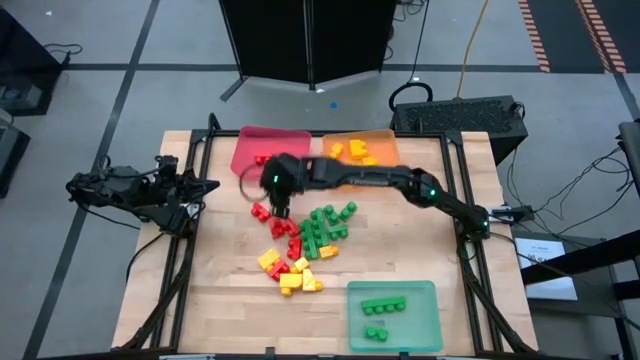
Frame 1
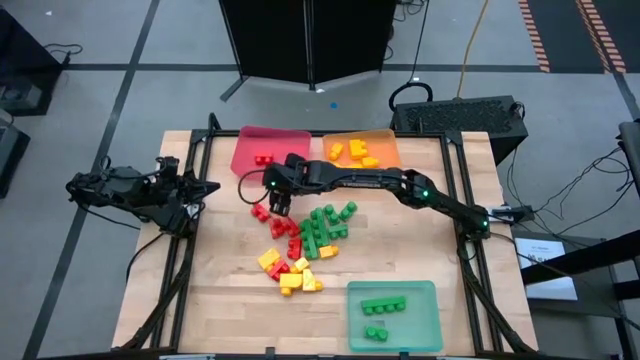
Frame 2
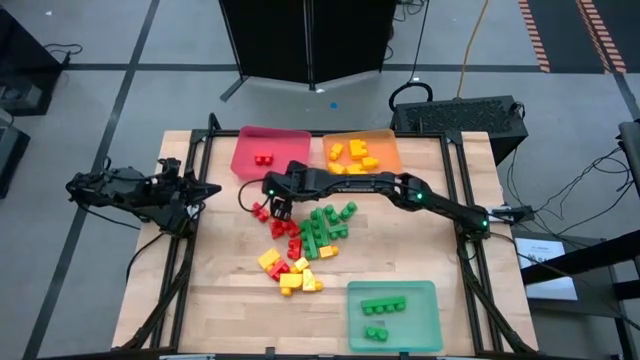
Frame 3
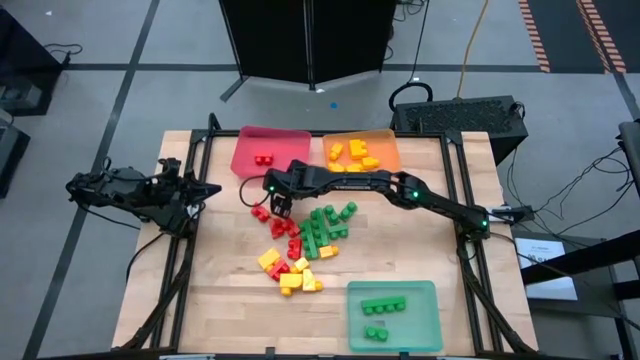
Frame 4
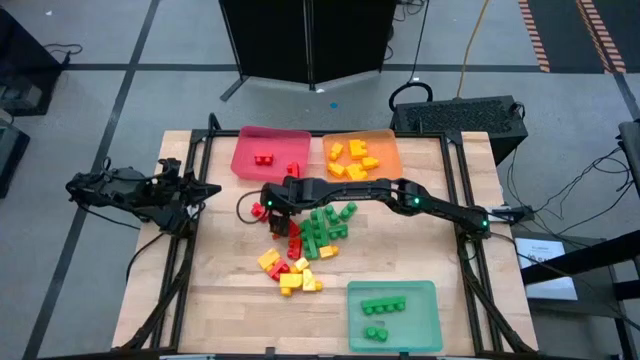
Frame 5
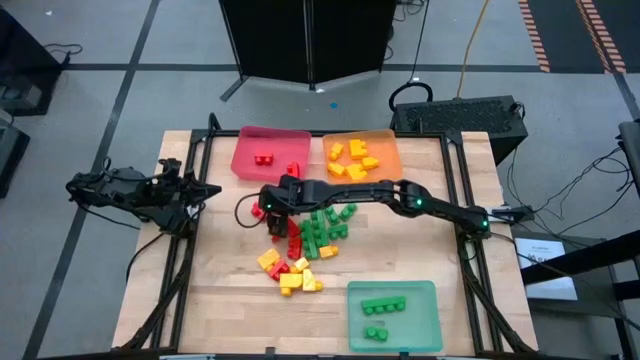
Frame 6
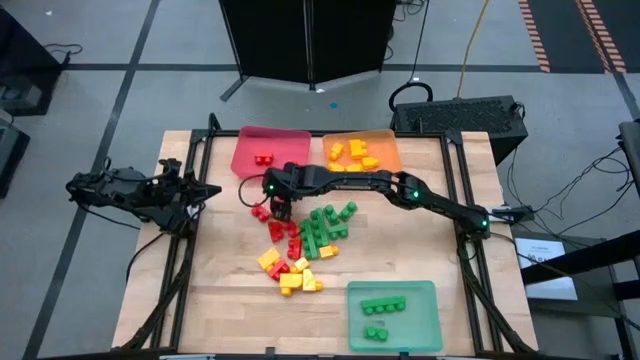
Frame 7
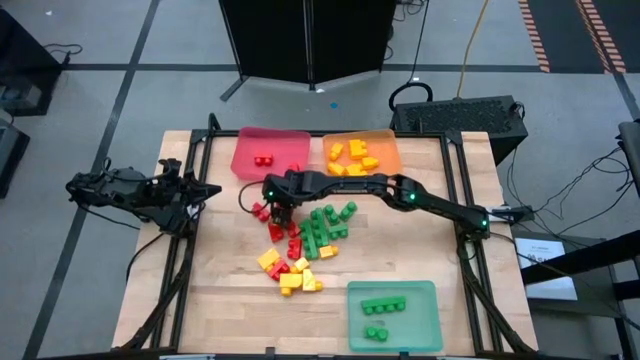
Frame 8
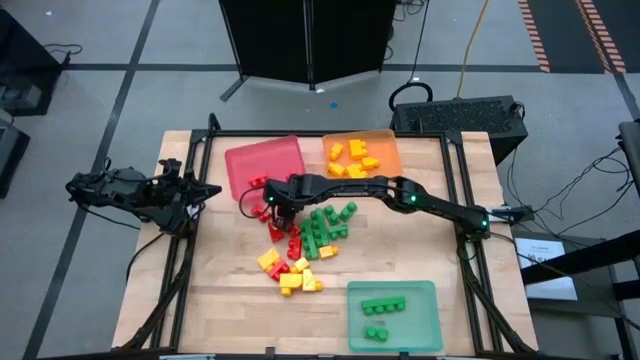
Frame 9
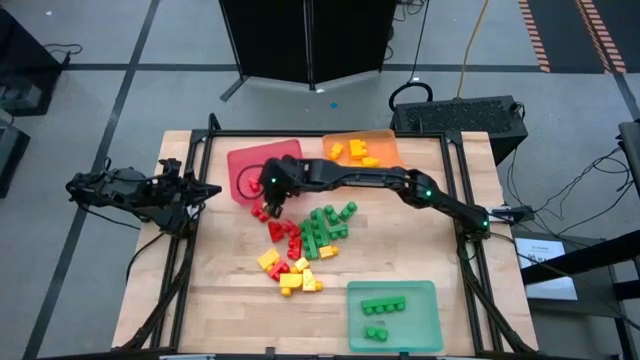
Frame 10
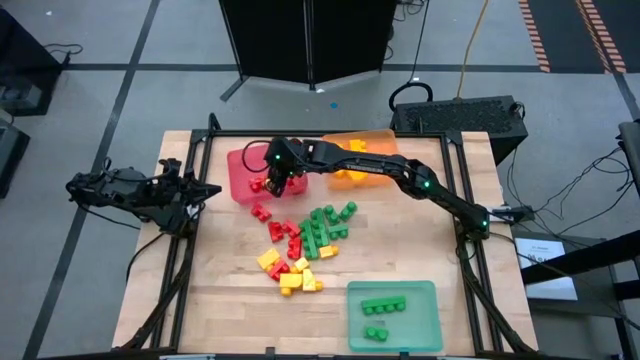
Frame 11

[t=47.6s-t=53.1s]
Task: Sort blocks
Put the red game piece into the red bin

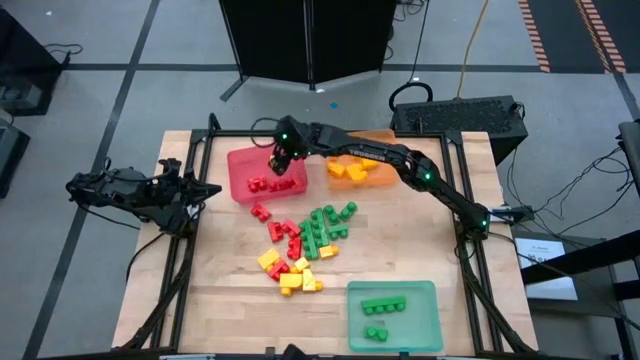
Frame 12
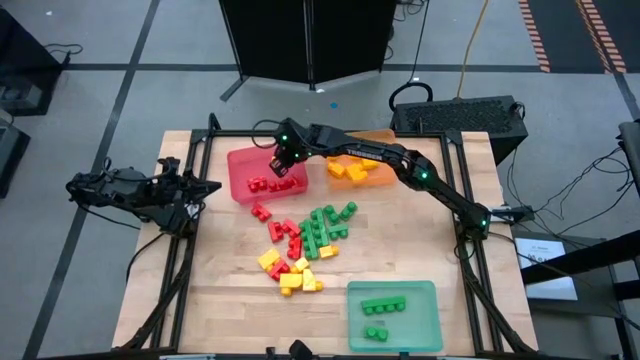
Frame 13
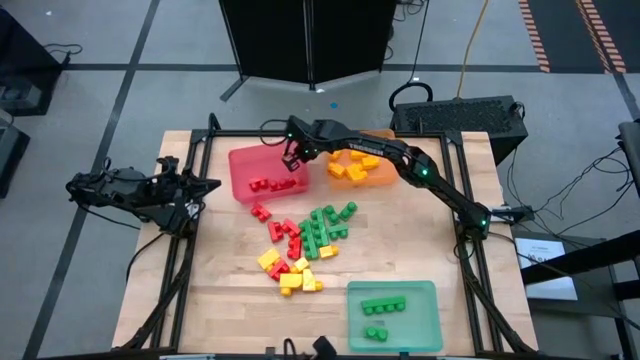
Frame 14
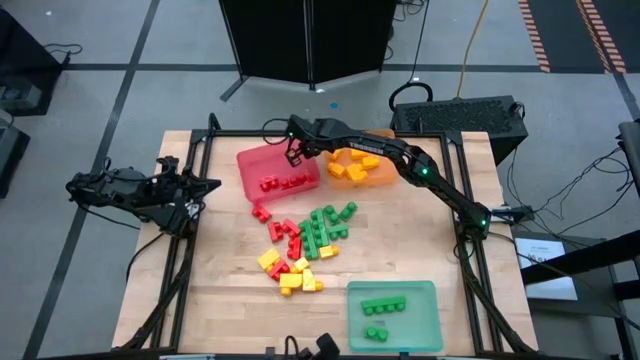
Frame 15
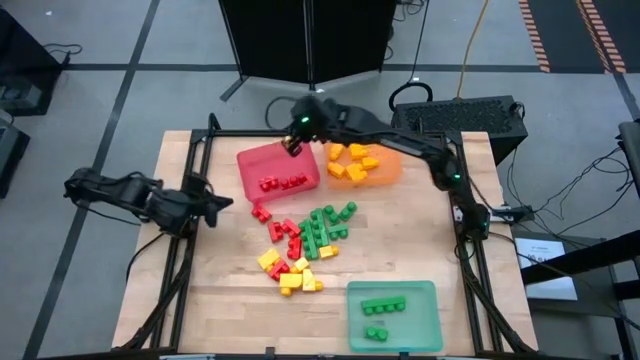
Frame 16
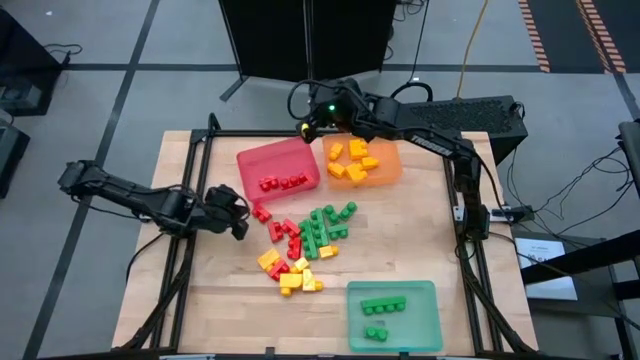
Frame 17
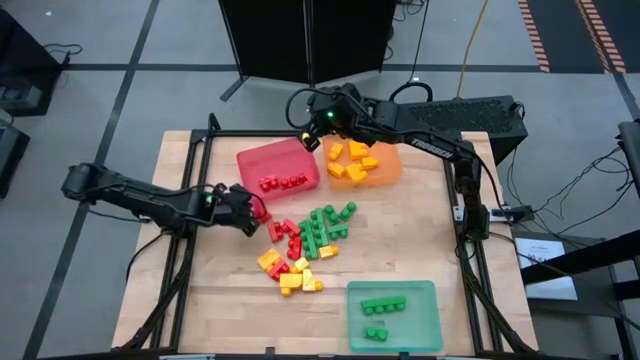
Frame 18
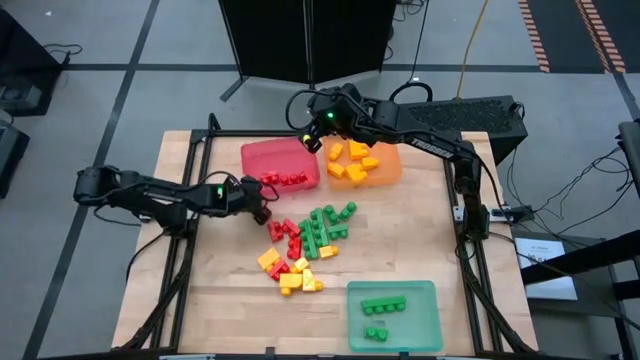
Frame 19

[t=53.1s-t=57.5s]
Adjust the red bin

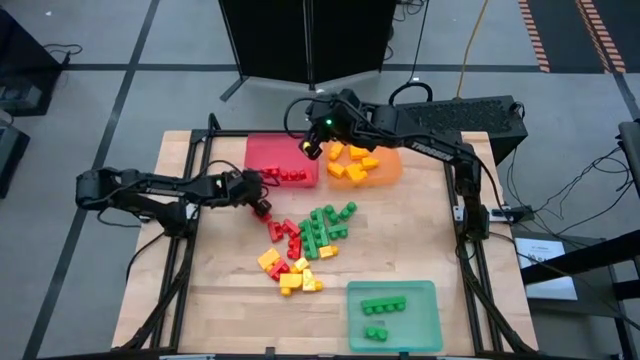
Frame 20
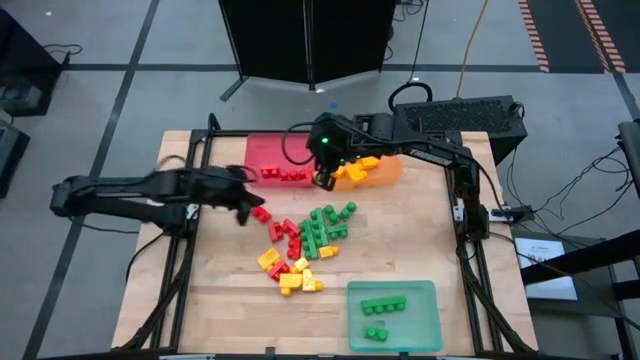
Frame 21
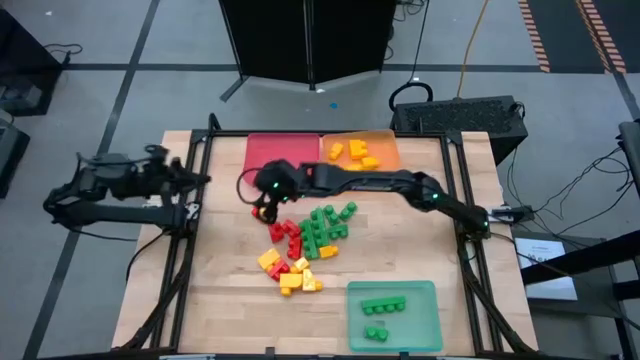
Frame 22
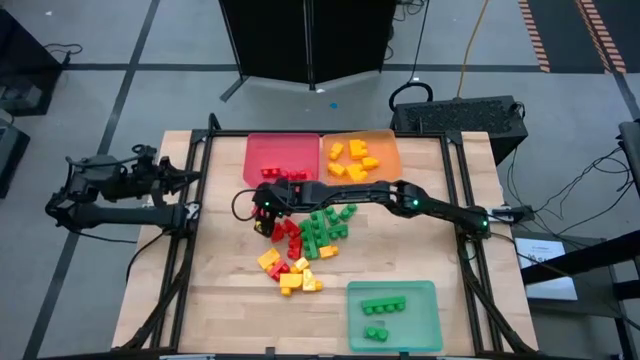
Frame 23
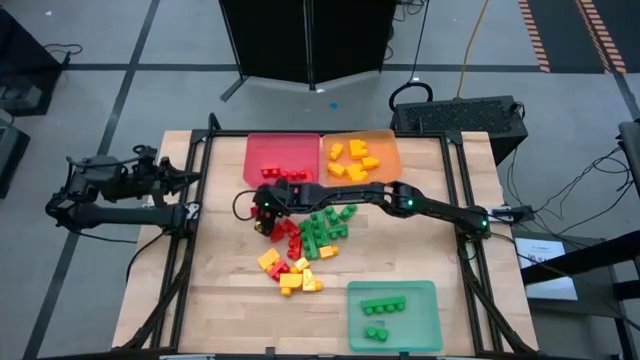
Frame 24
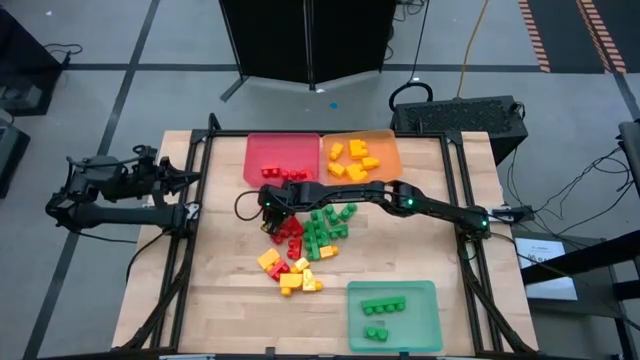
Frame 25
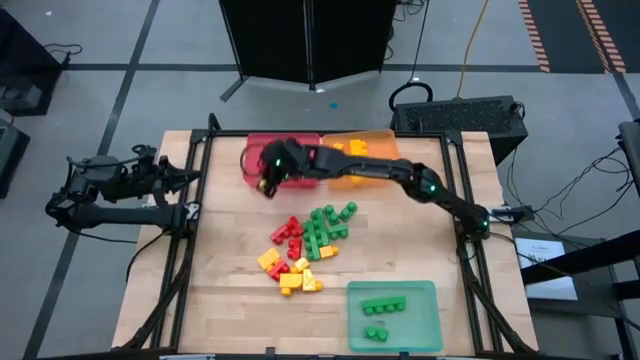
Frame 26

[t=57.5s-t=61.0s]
Put the red game piece into the red bin

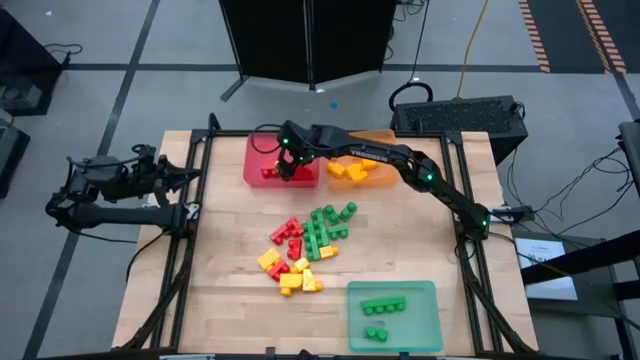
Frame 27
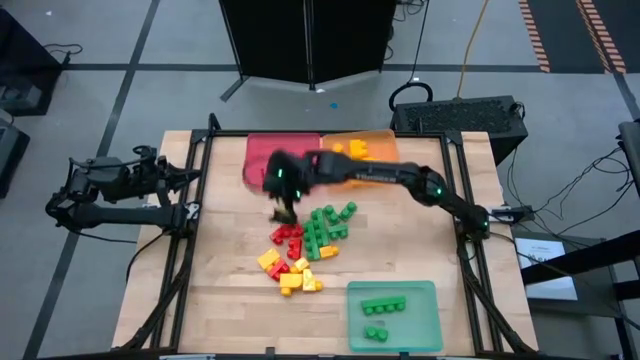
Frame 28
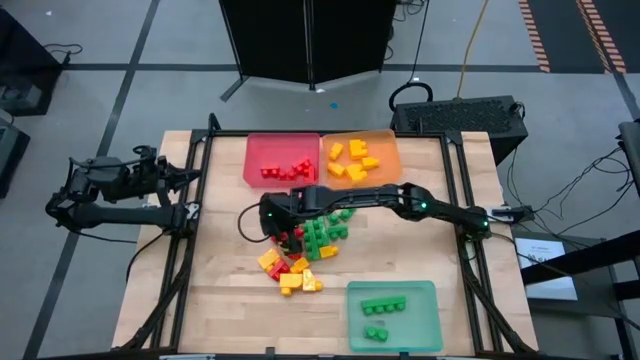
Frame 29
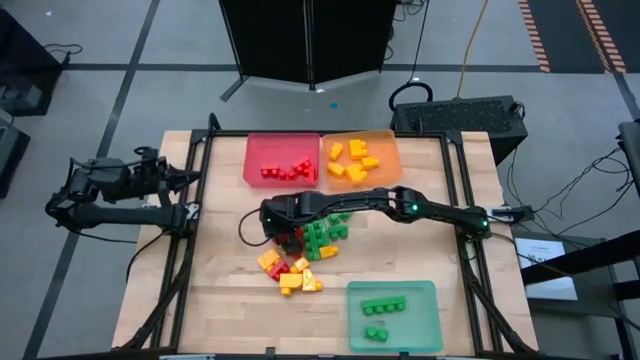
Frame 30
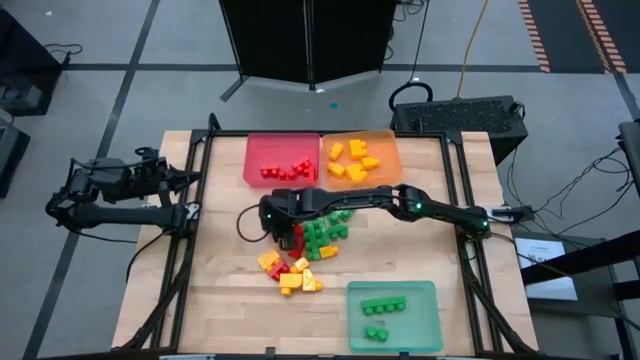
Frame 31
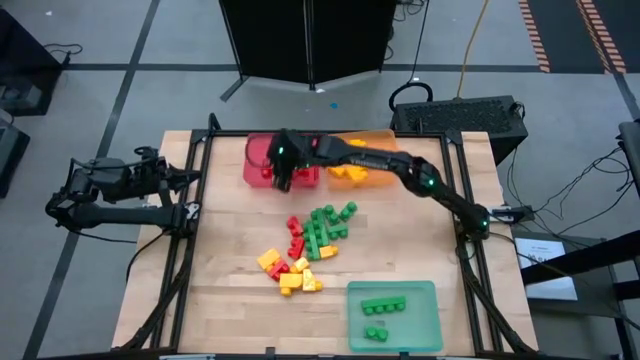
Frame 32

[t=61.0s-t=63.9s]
Put the red game piece into the red bin

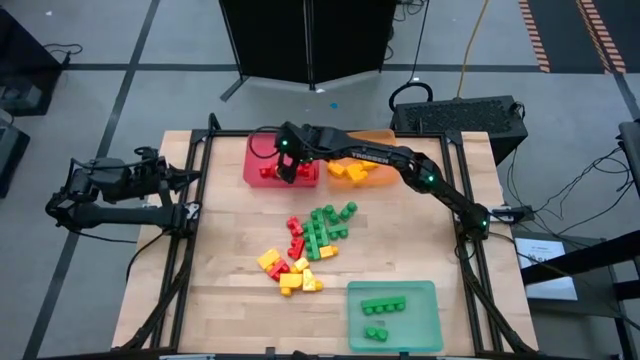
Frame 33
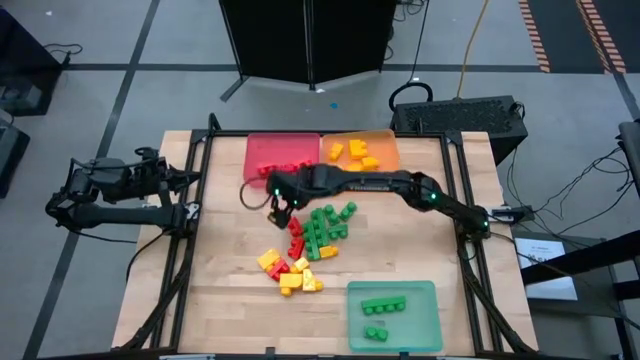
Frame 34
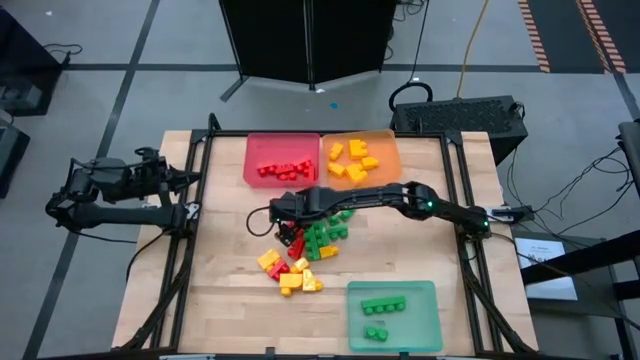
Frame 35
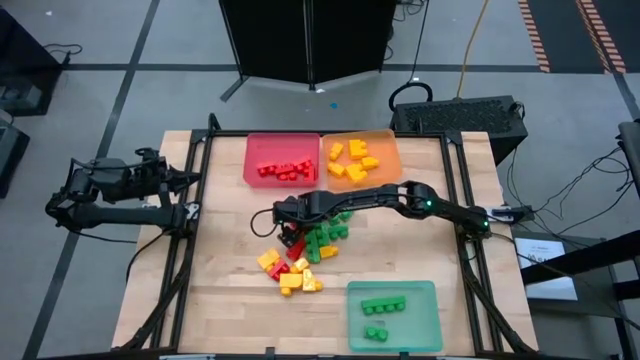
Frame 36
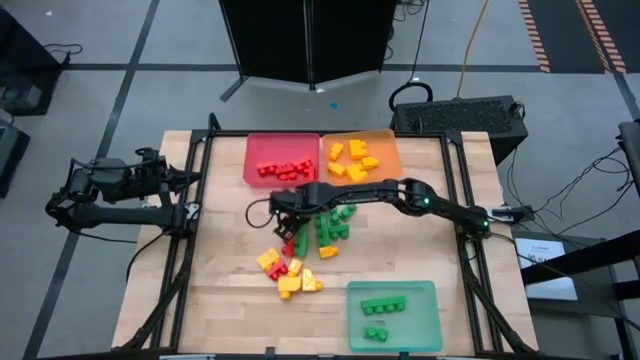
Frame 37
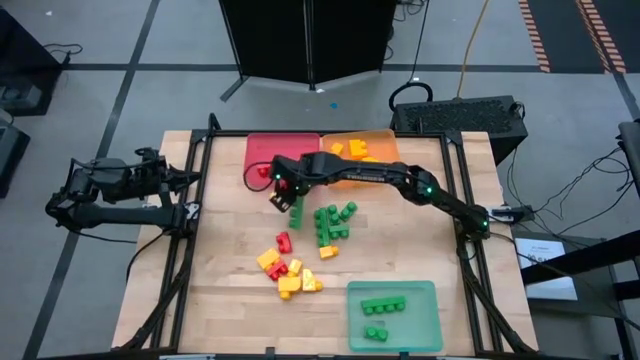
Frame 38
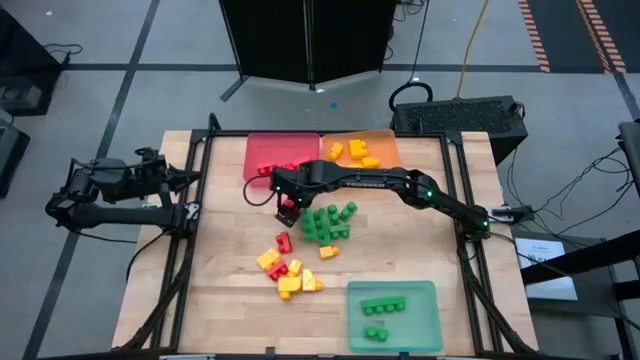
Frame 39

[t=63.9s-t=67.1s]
Put the green game piece into the green bin

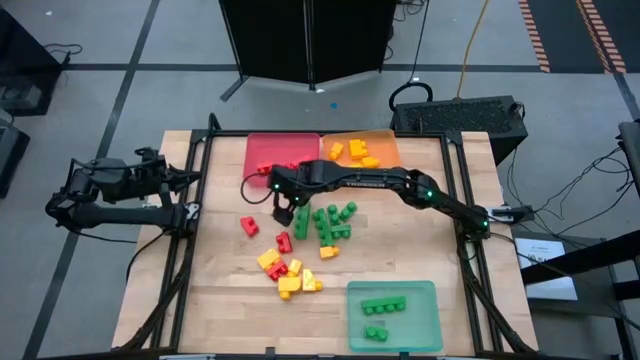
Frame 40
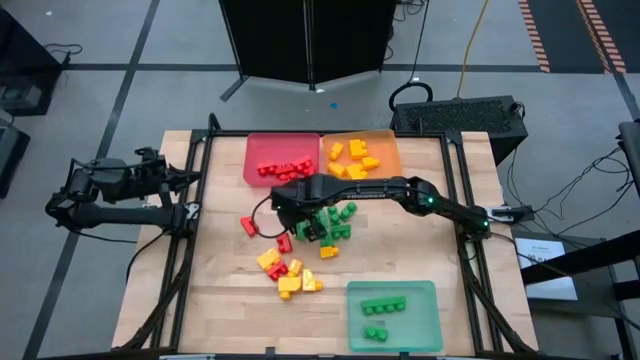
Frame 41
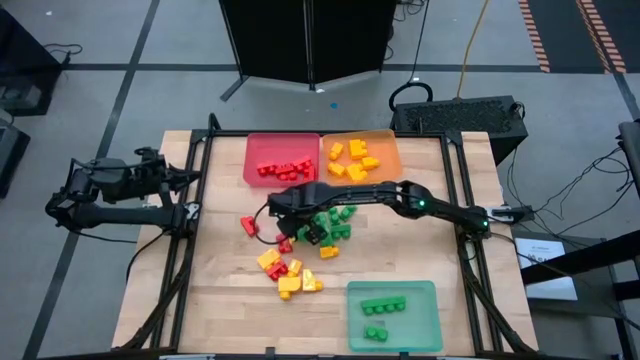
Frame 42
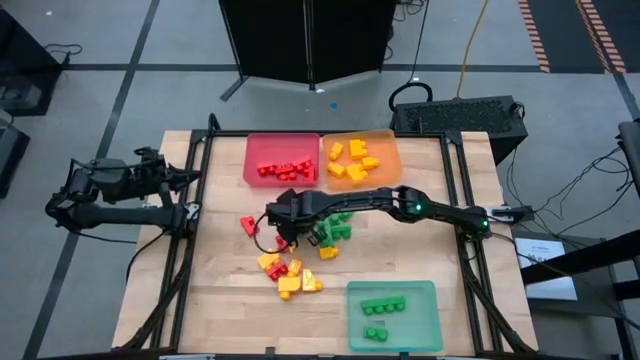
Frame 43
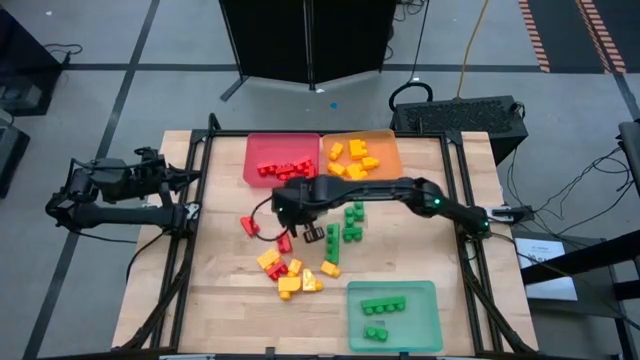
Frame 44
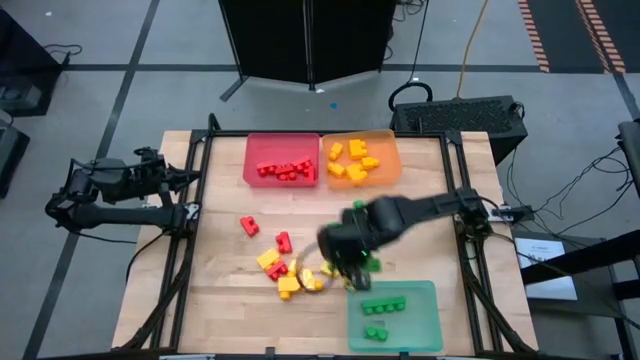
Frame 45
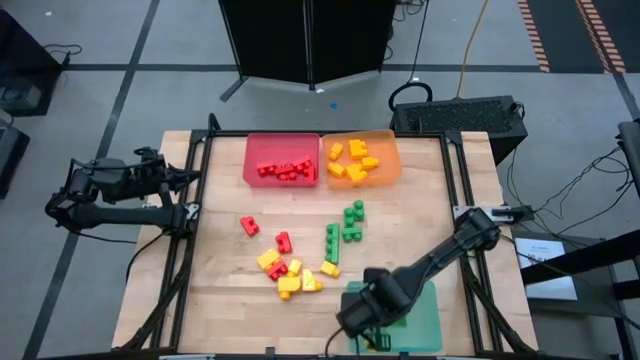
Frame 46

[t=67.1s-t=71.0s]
Put the green game piece into the green bin
